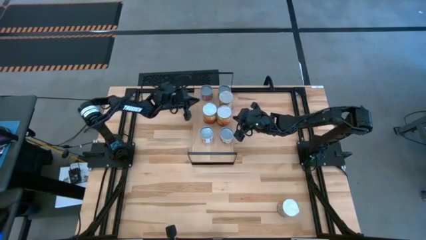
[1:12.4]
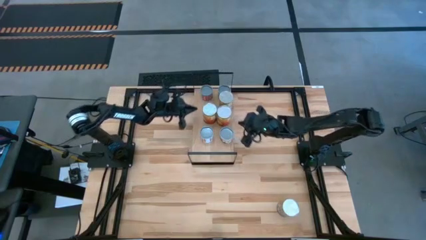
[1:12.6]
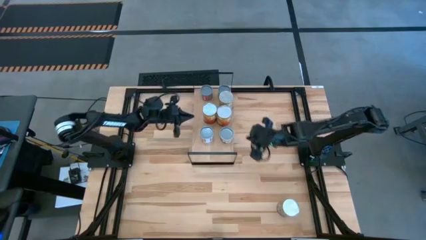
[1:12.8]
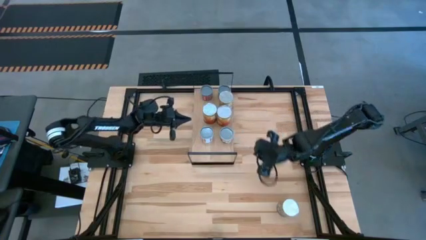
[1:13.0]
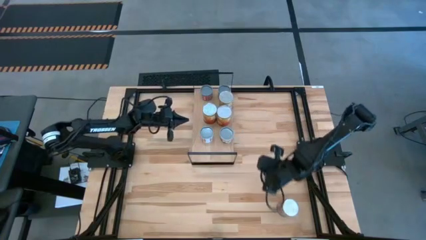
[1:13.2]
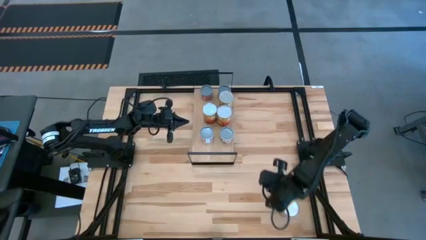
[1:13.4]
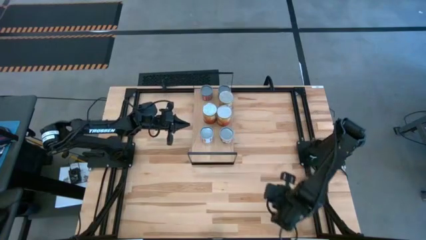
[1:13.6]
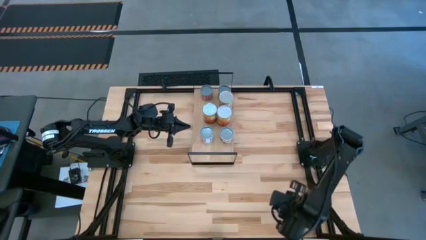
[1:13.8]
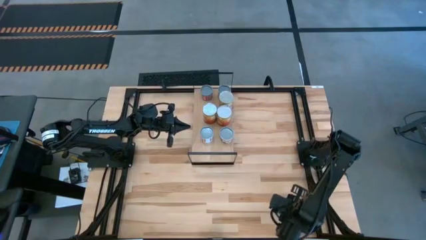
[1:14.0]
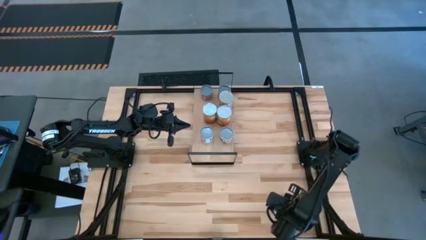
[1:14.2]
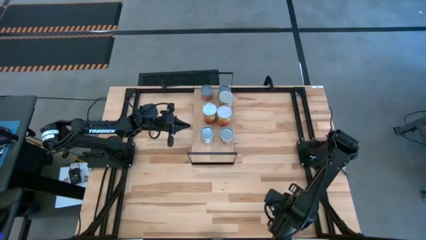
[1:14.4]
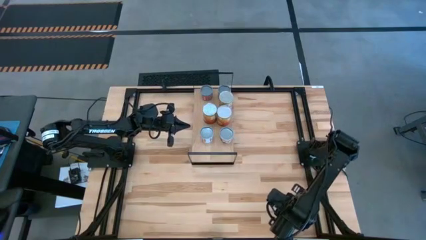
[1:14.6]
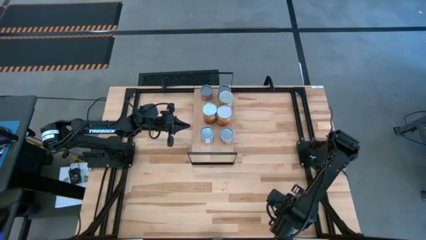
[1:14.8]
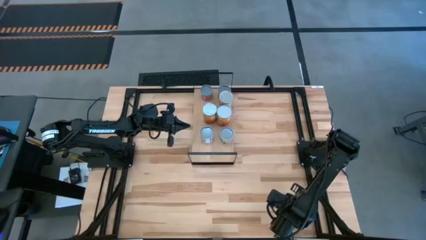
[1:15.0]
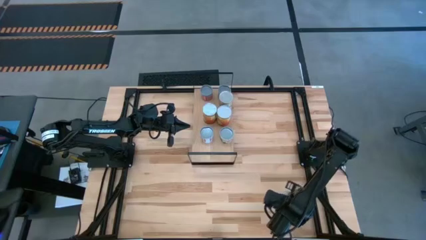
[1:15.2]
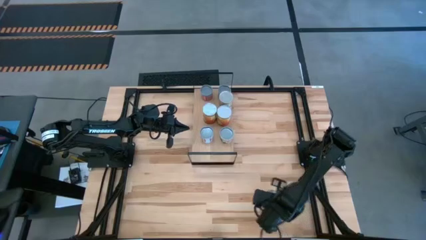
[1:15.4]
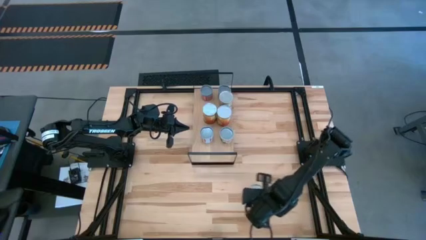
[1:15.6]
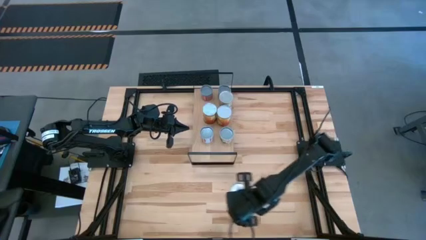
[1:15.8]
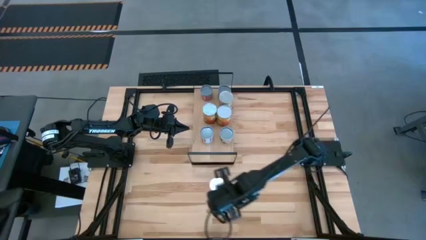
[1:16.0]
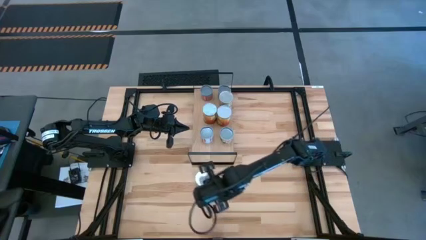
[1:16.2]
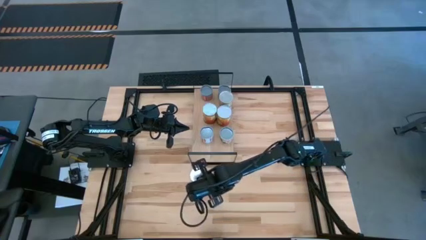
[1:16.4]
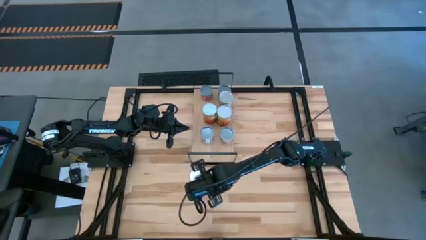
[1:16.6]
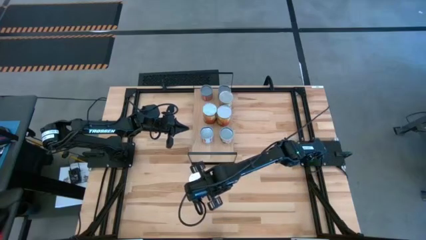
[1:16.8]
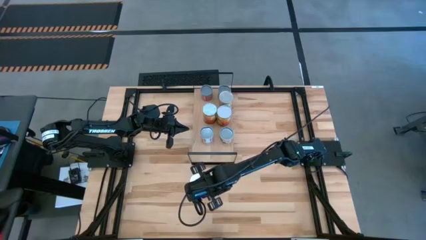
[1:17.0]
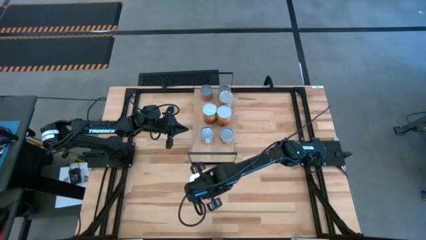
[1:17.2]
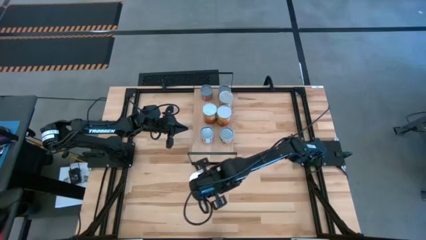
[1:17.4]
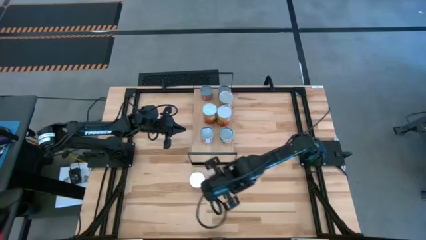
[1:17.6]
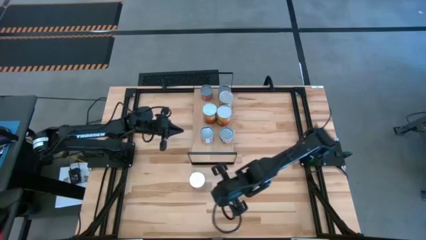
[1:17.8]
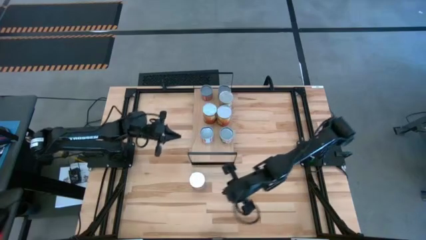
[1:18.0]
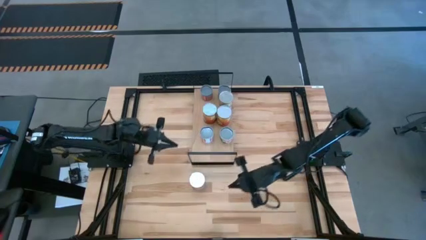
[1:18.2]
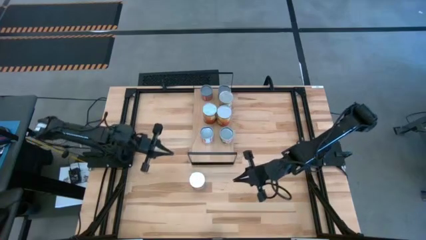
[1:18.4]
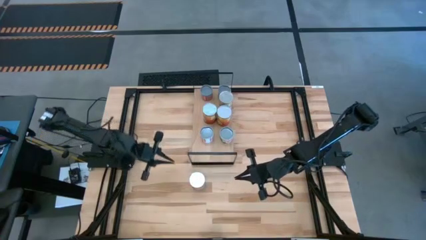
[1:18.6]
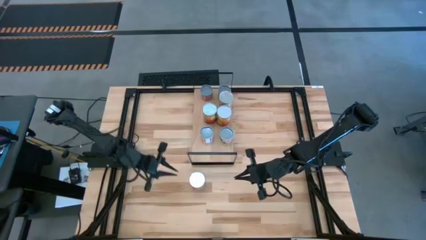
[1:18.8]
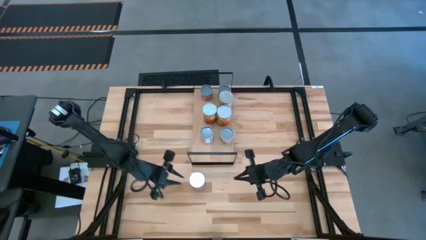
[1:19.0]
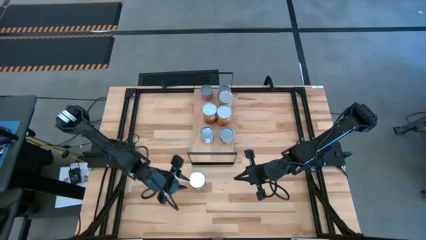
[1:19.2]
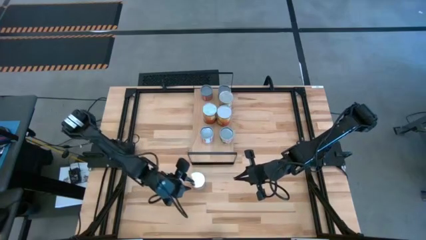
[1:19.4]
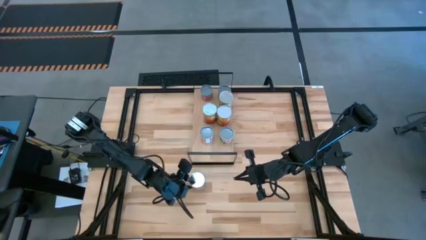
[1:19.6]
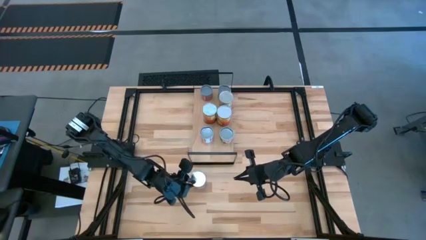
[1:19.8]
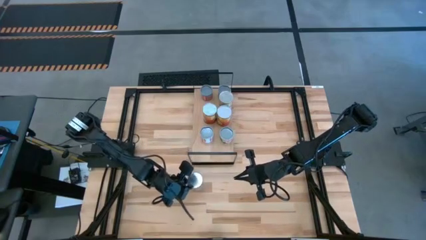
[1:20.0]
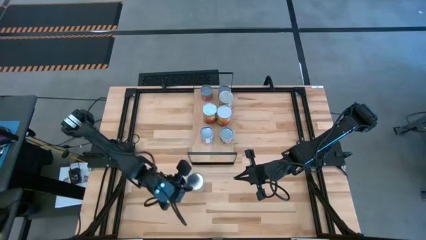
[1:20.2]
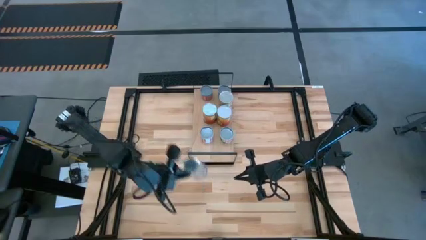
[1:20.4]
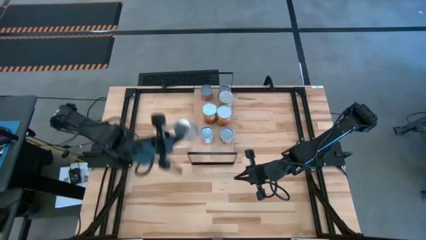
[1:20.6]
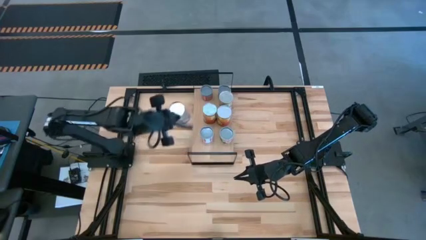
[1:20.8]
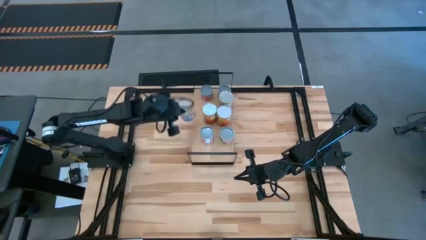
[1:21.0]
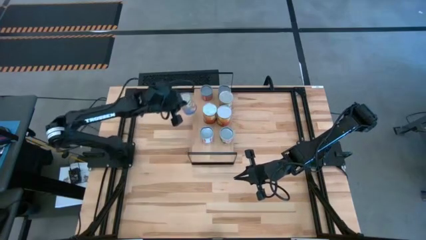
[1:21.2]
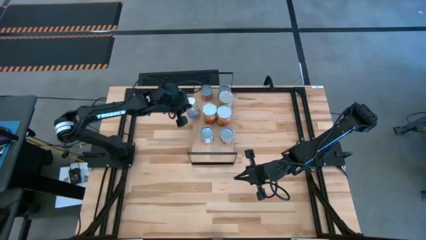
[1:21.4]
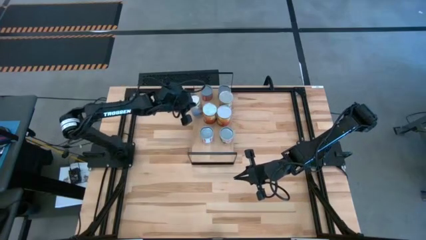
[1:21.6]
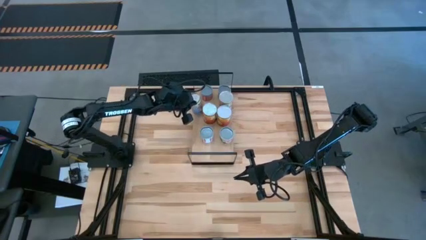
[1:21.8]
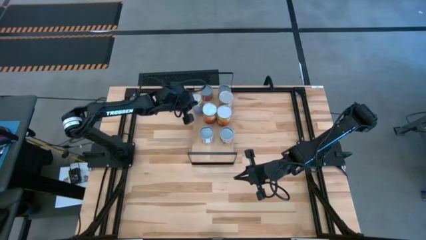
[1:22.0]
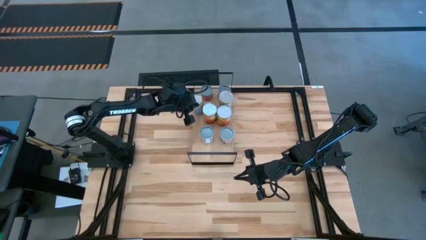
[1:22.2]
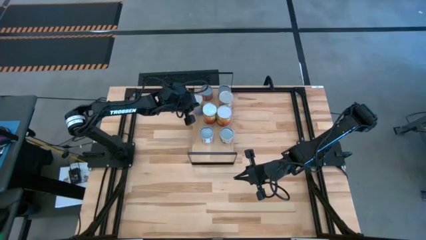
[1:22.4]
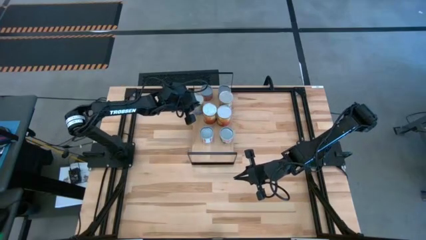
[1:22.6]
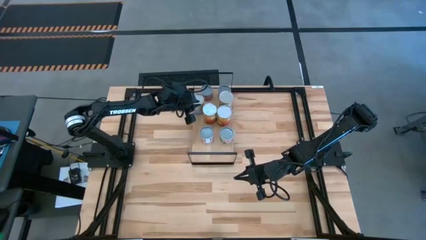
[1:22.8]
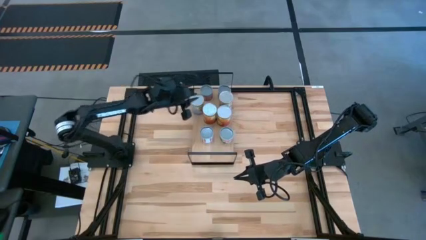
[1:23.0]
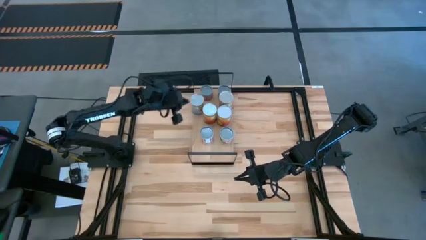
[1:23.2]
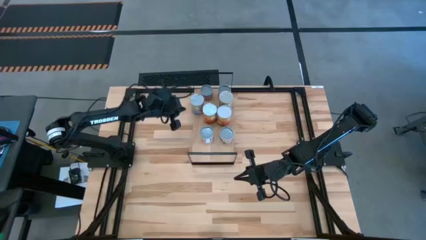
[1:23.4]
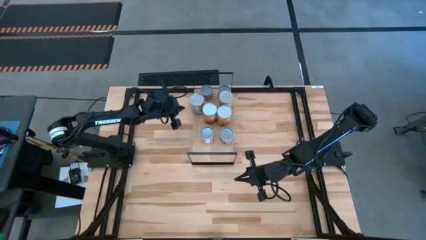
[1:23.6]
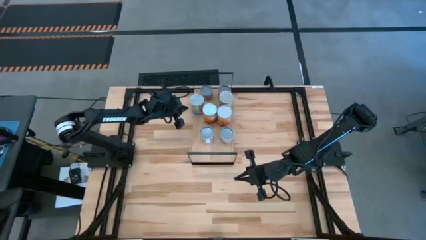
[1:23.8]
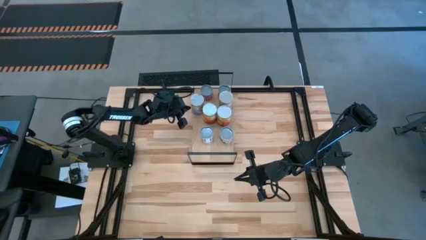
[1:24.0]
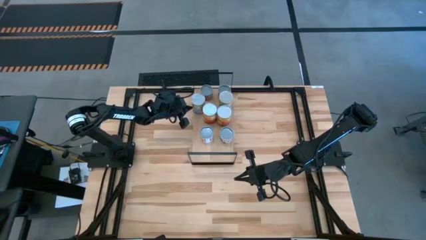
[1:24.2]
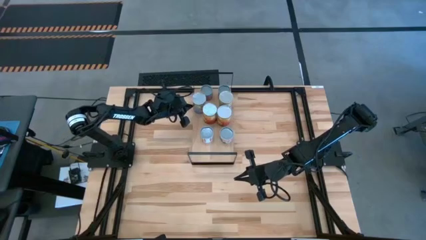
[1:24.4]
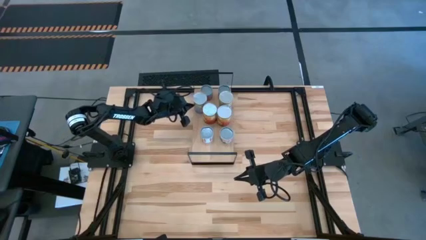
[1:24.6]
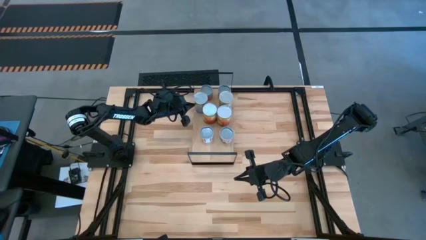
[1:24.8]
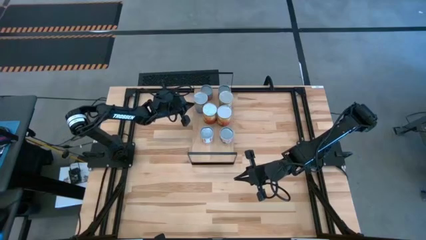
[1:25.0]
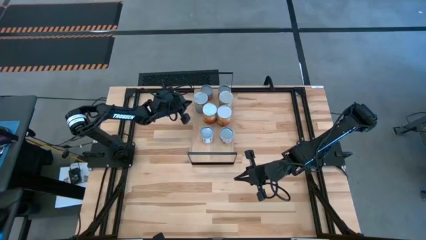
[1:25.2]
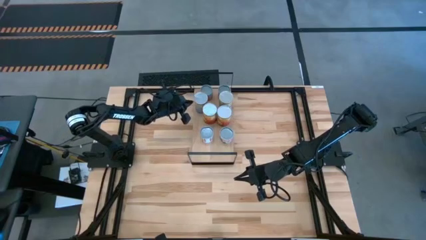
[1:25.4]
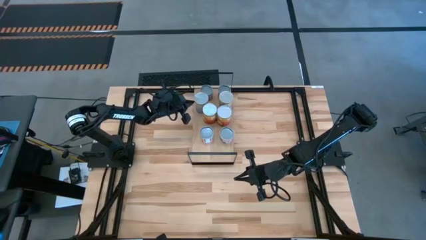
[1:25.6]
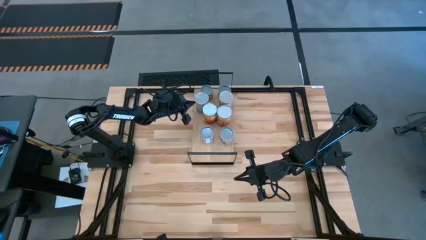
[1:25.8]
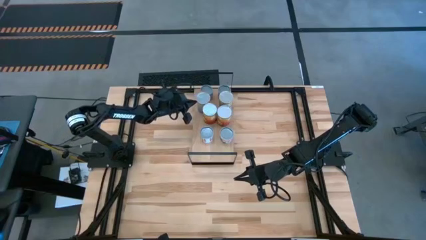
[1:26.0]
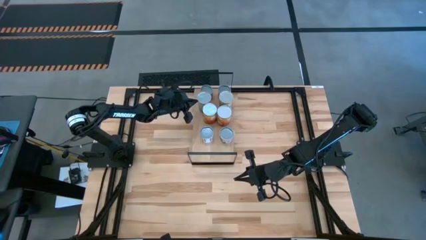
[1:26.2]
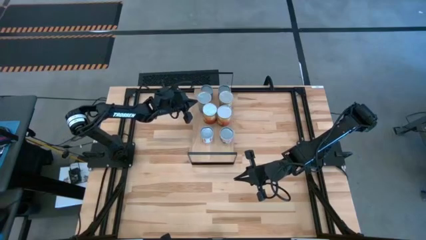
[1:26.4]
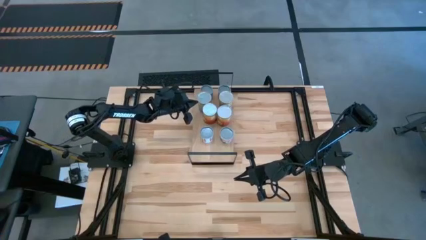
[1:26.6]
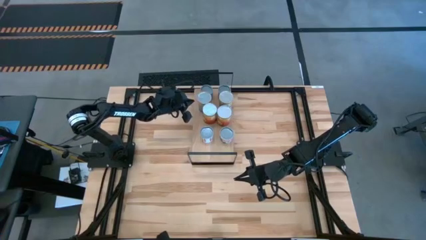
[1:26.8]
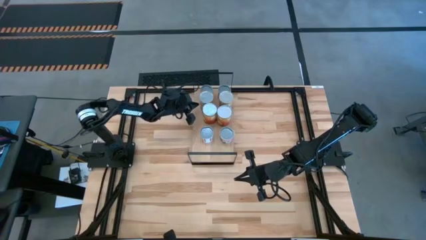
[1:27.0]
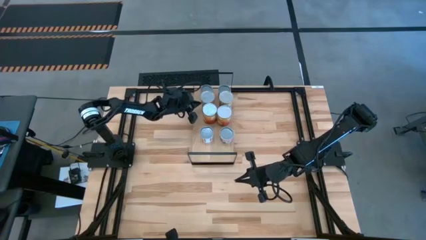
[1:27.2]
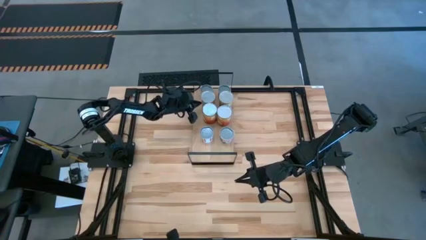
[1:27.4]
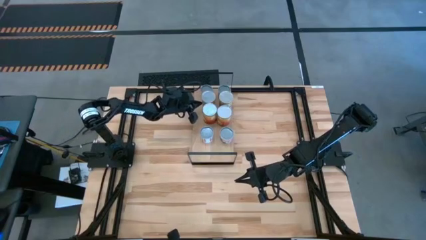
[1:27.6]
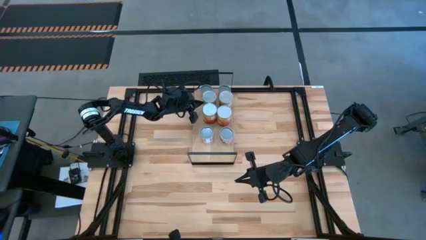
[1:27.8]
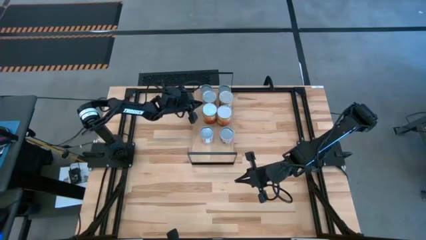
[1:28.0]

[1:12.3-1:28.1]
Task: Pick and place cans onto a shelf
Put the large blue can on the shelf aligned with the other blue can
